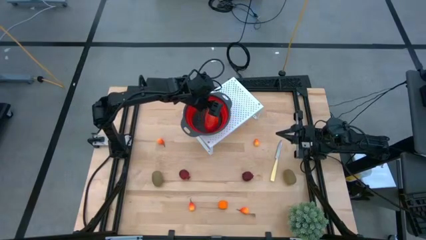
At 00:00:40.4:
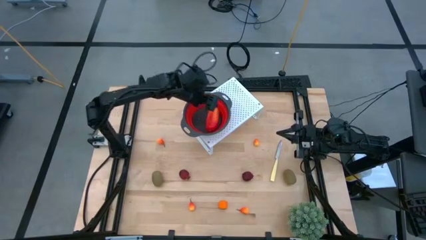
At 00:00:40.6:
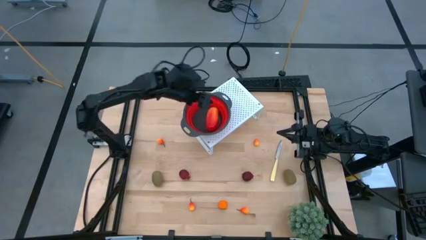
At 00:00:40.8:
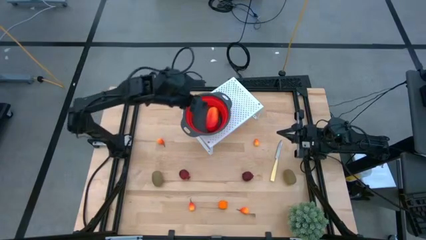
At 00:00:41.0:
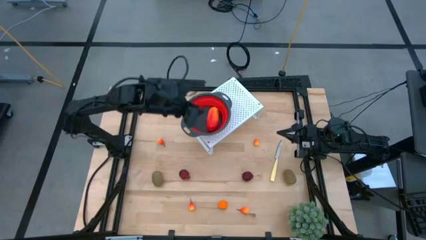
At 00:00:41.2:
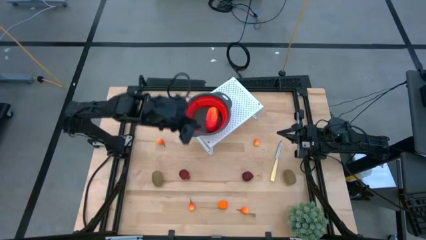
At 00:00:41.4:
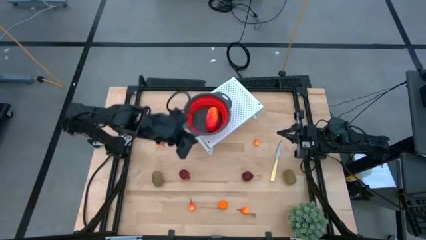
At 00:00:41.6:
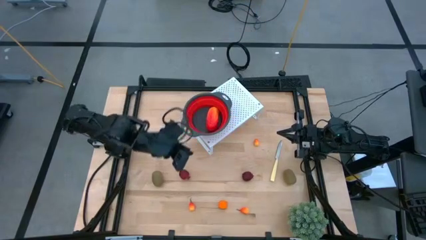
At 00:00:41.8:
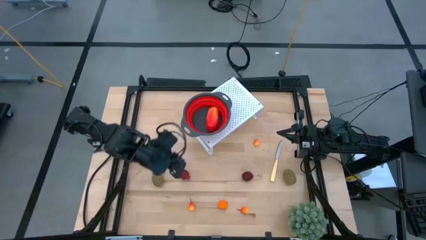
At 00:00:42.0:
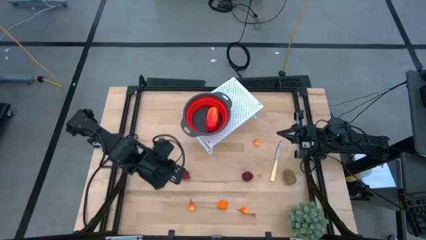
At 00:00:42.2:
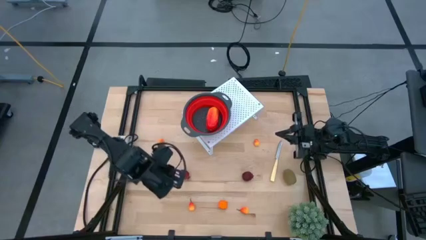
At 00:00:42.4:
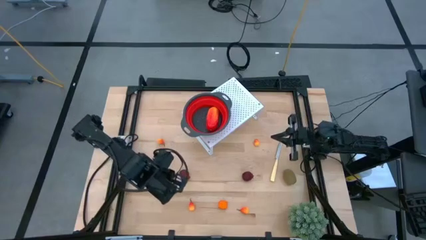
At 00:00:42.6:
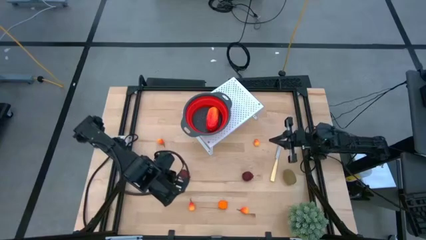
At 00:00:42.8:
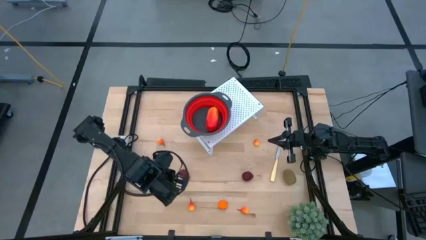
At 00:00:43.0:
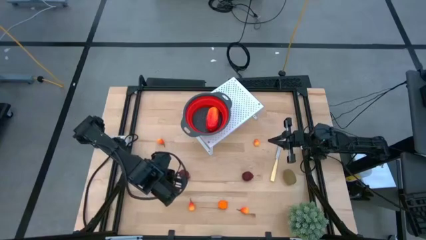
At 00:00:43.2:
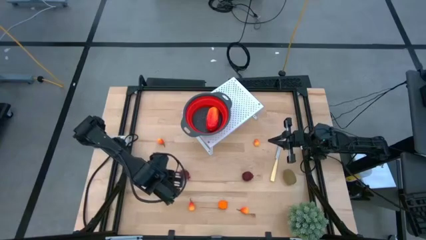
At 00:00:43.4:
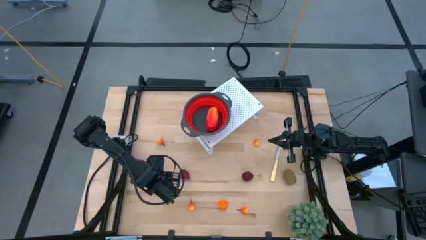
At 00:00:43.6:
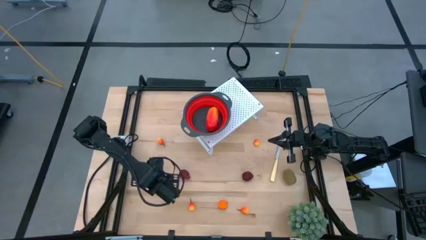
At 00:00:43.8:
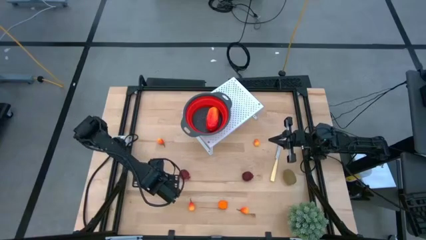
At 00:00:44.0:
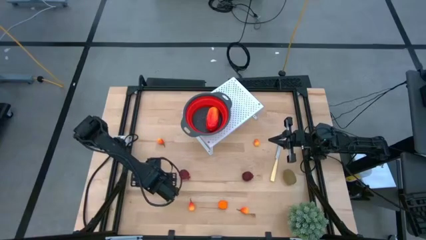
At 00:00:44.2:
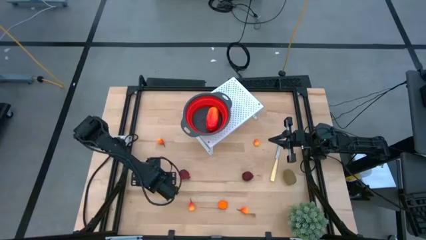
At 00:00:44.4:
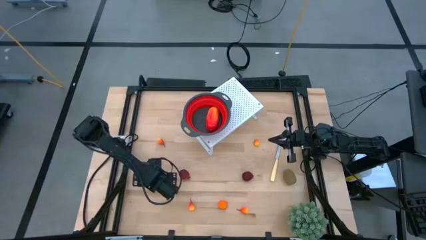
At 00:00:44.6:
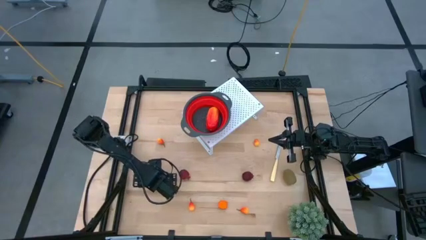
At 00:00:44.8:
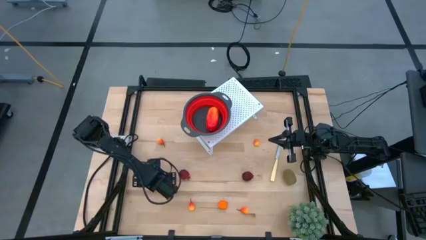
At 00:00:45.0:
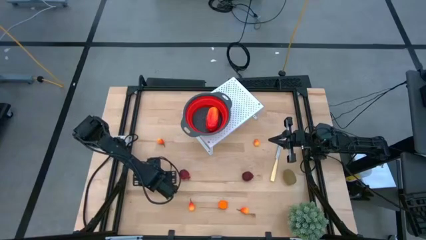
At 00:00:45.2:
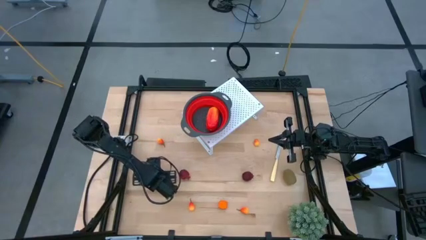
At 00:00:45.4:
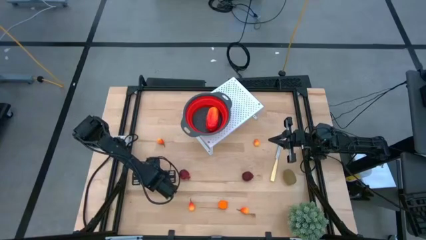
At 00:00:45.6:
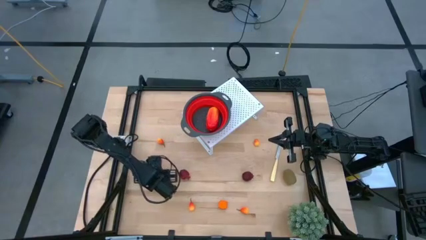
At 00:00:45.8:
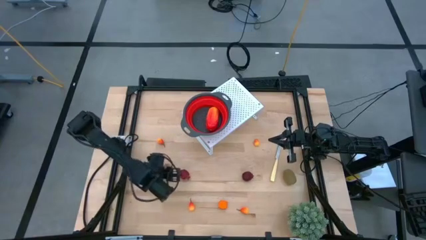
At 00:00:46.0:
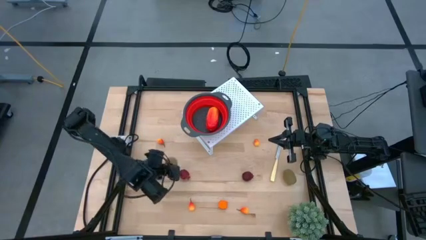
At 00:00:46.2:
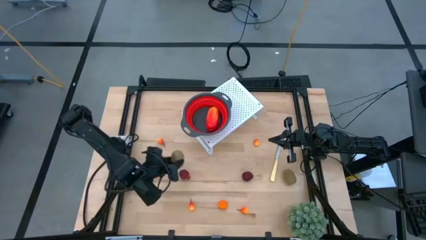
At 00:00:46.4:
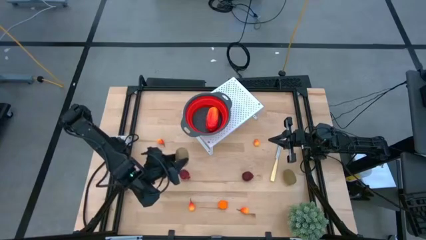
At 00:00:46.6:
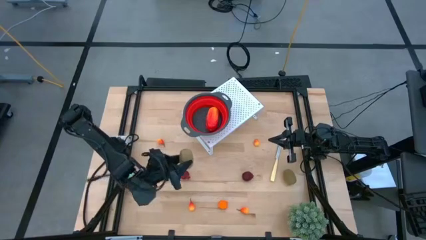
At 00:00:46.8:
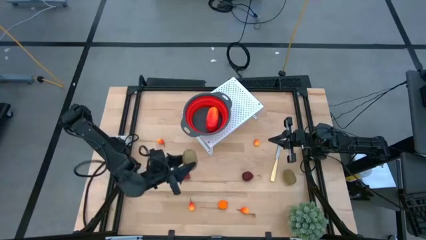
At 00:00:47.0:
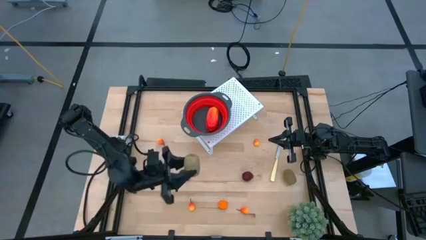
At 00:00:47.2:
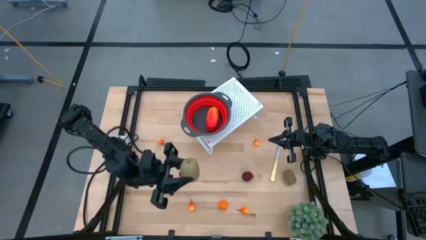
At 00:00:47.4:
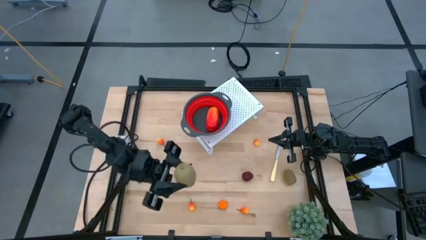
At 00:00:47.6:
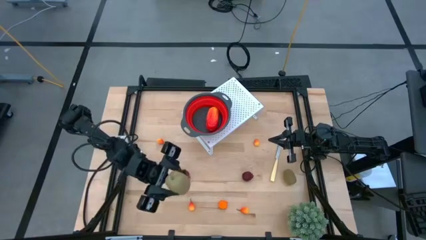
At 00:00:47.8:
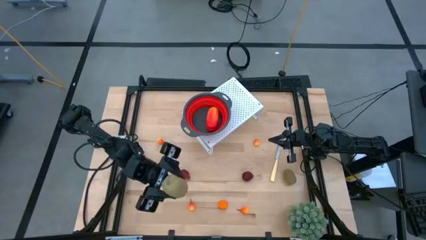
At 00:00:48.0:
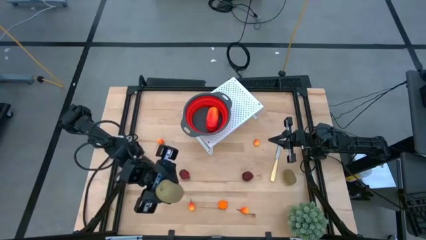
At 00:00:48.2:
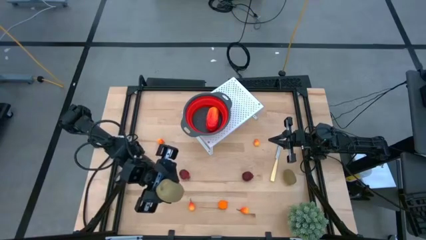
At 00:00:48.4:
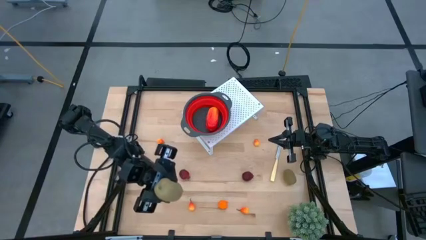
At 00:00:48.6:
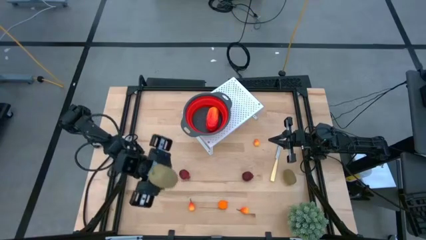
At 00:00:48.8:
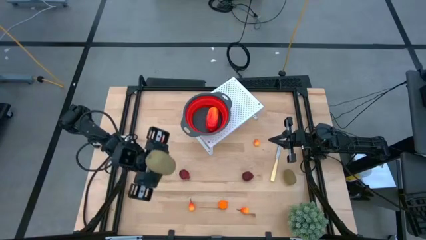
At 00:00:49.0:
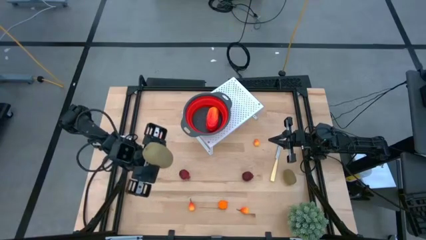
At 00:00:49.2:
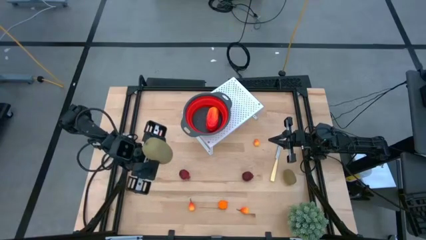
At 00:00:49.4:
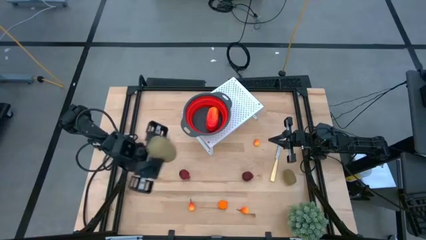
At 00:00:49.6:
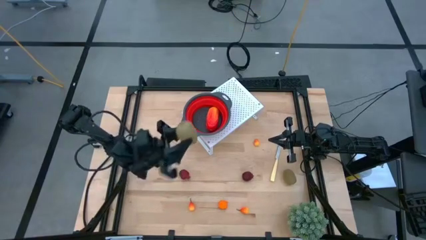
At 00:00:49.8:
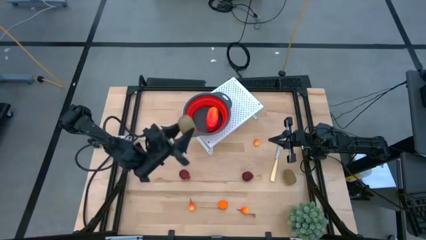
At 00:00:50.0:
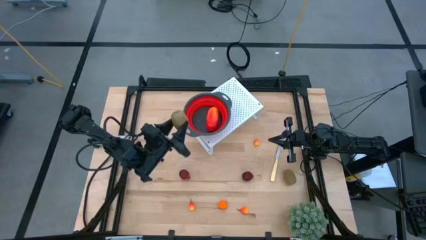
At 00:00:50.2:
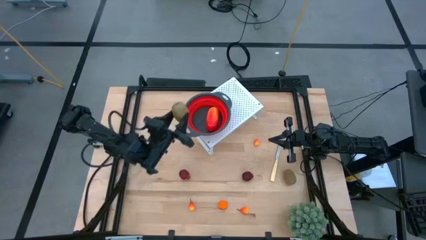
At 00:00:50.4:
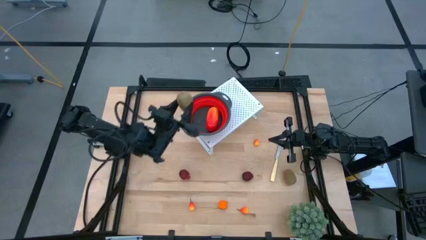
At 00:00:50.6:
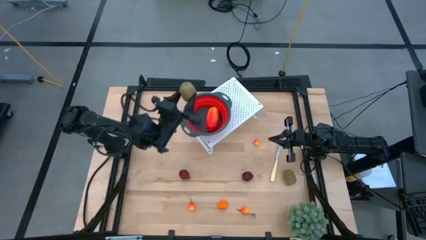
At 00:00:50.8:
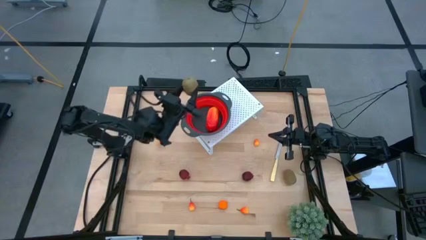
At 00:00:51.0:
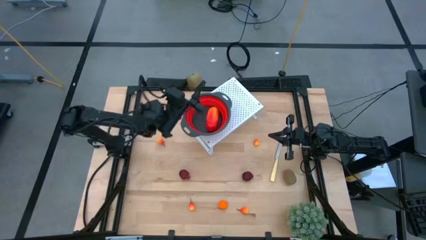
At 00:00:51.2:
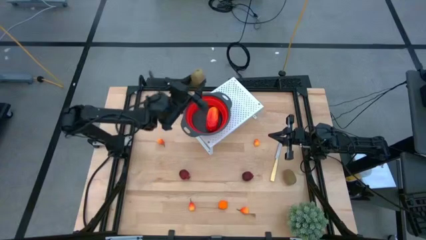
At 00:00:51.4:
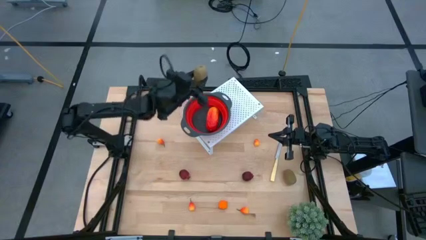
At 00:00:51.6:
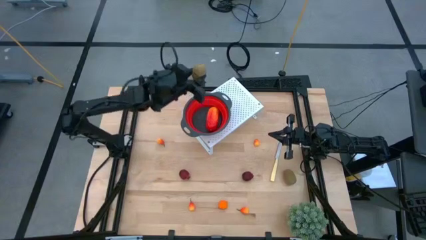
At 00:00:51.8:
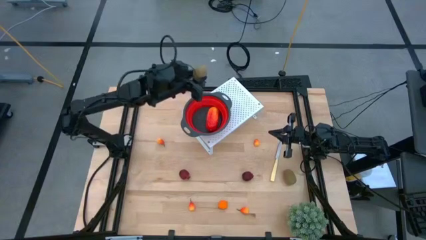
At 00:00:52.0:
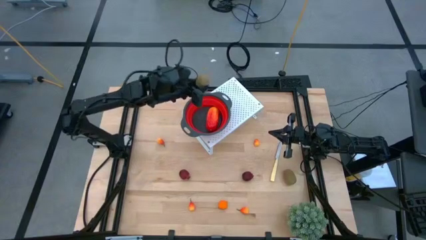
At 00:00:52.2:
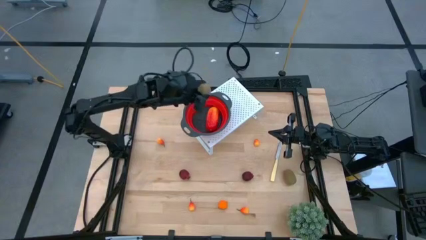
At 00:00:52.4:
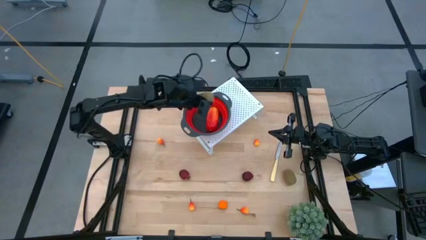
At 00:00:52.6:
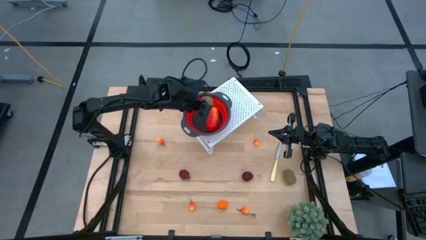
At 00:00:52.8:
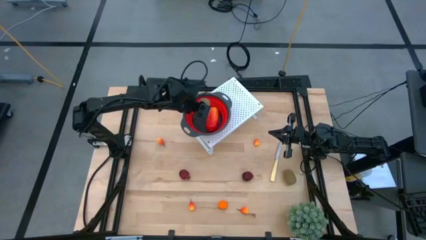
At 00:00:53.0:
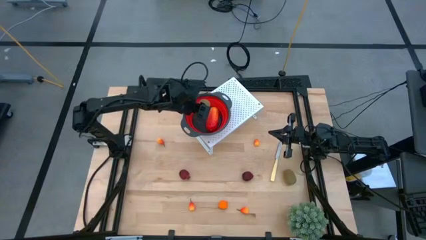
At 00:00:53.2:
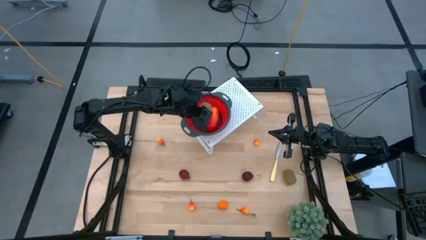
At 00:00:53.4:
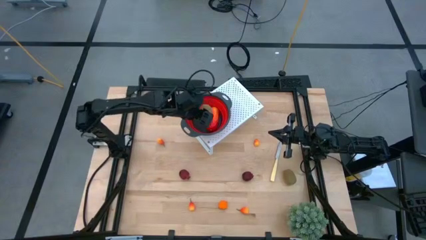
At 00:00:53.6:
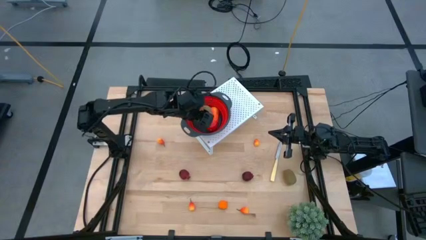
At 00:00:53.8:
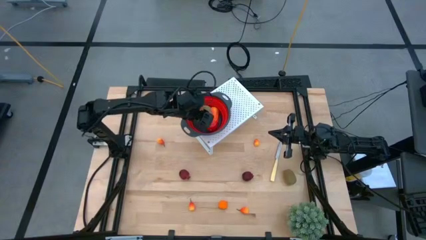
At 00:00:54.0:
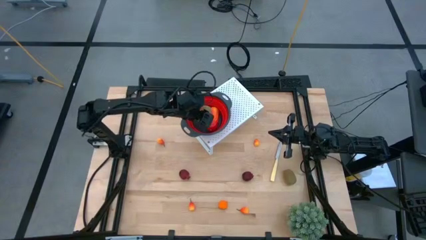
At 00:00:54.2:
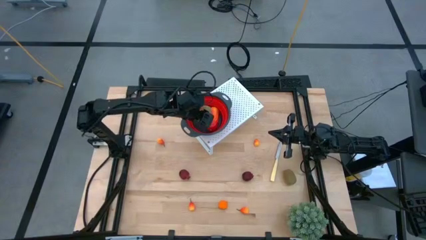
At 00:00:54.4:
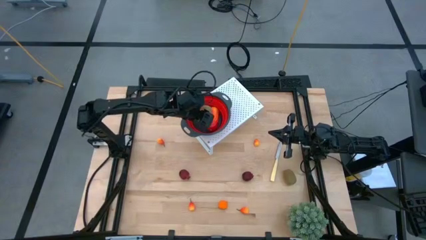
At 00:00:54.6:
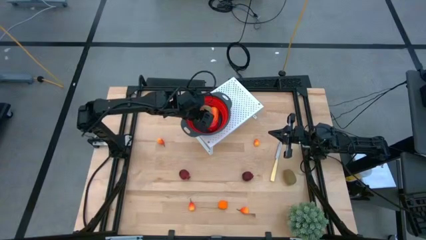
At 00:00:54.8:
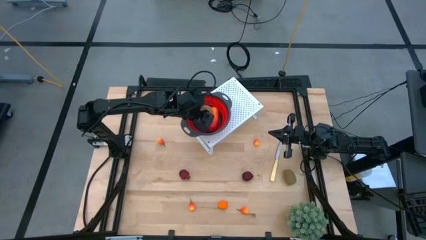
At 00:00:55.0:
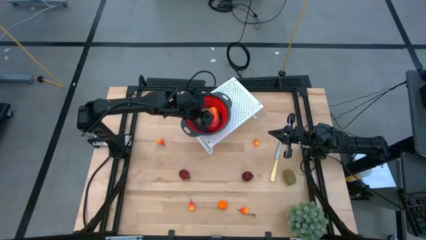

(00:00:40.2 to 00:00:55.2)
Task: Pick & Place Fruit
Put the left kiwi into the red strainer bowl on the shelf
